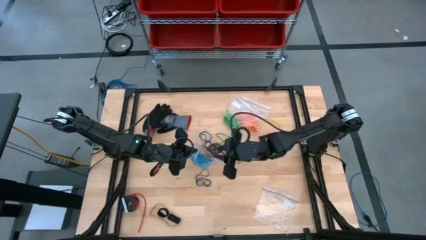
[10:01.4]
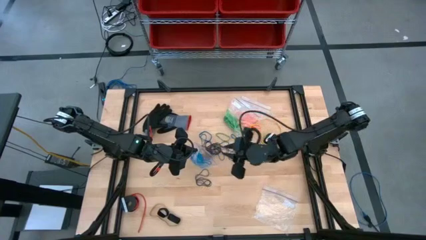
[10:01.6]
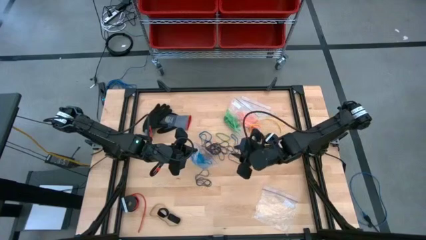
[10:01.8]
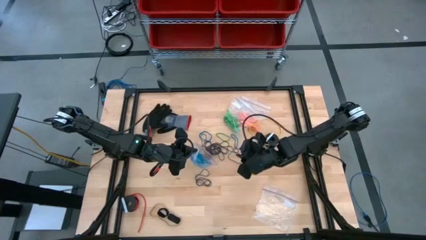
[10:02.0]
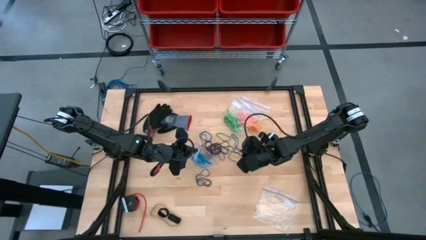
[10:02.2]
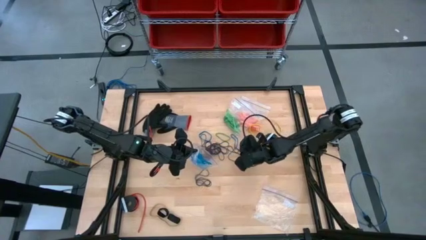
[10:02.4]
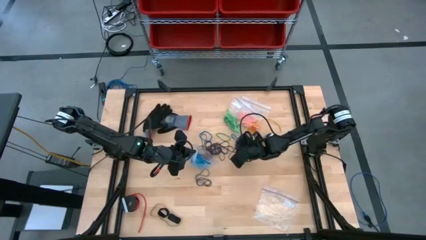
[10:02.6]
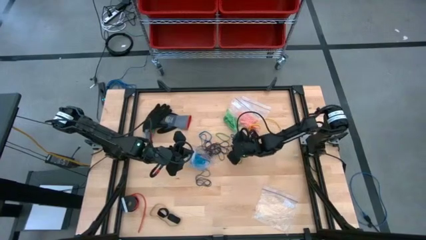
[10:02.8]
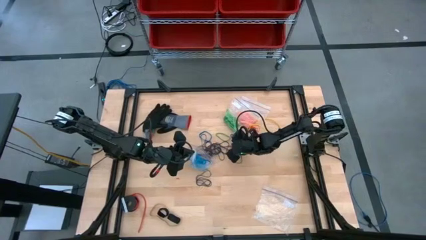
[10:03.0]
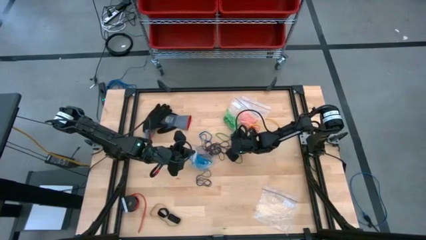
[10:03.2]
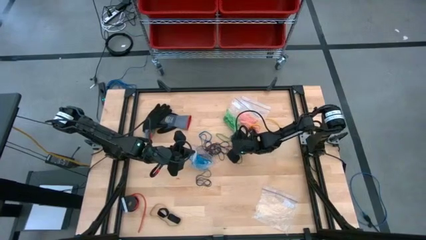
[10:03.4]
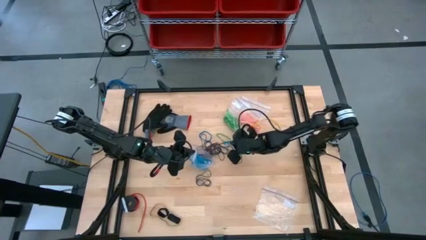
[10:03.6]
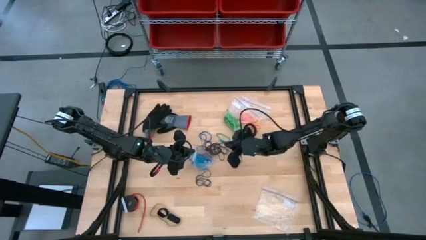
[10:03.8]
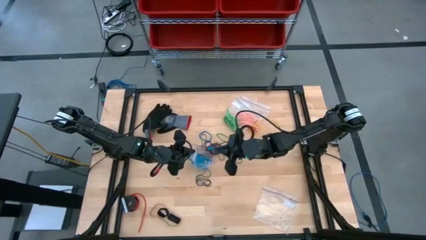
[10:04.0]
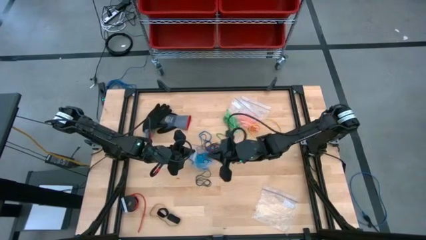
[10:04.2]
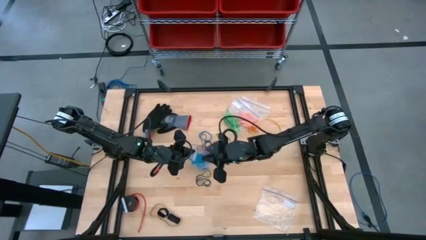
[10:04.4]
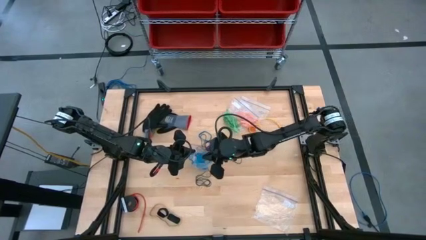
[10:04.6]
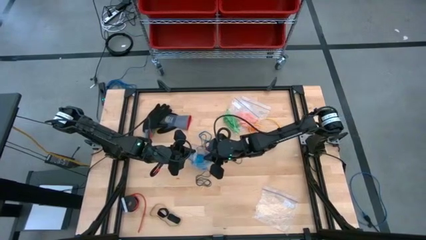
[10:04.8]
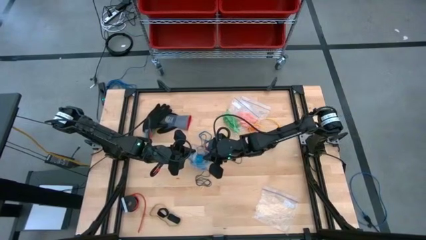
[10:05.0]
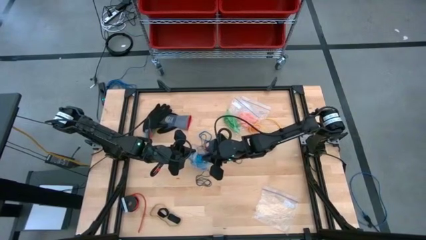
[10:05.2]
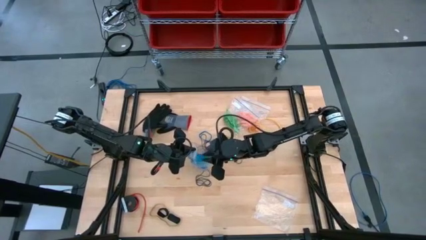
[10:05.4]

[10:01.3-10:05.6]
Task: Sort rubber bands
Put the blue rubber band into the transparent zip bag

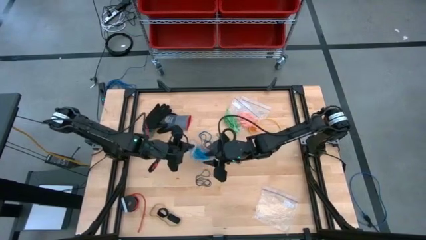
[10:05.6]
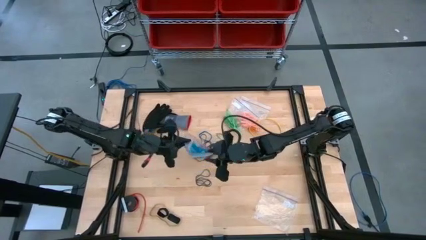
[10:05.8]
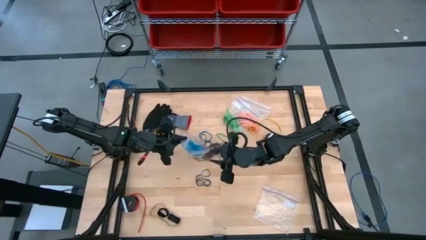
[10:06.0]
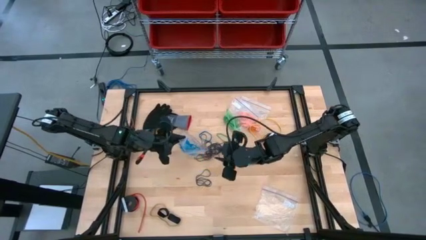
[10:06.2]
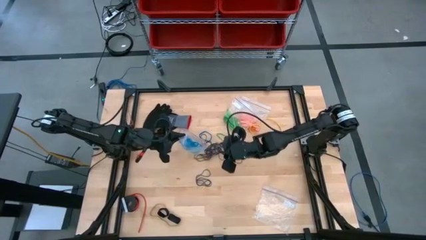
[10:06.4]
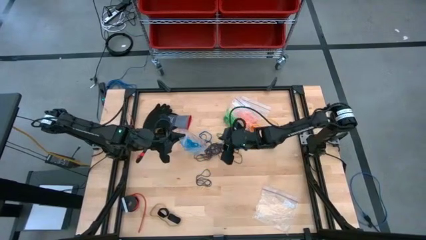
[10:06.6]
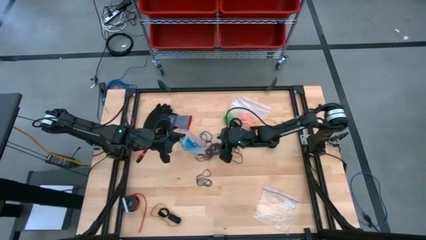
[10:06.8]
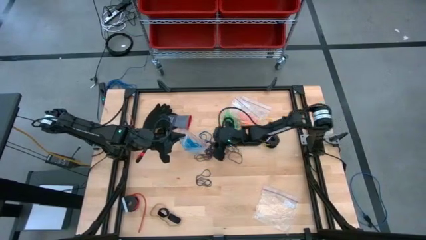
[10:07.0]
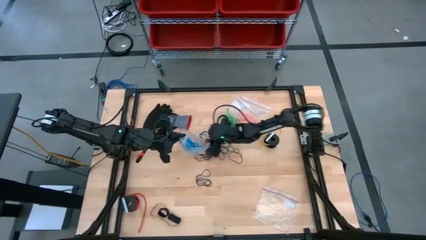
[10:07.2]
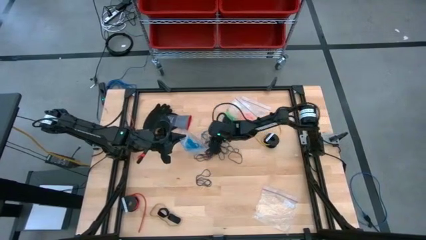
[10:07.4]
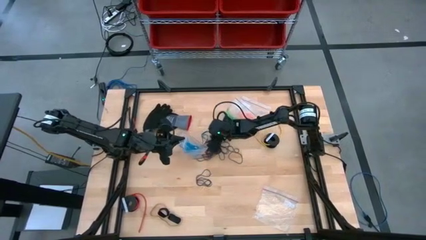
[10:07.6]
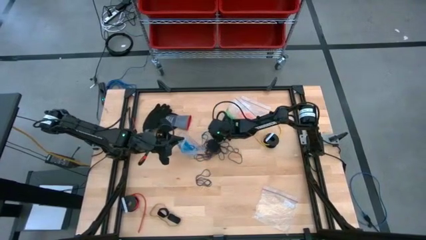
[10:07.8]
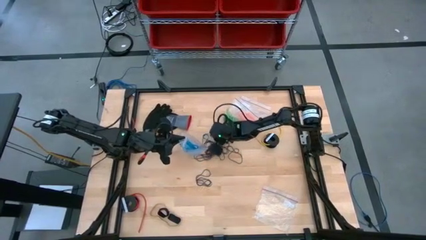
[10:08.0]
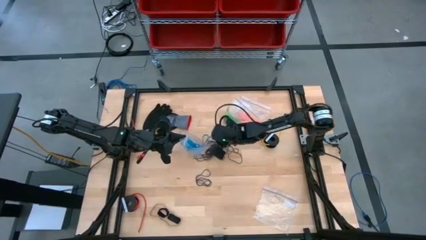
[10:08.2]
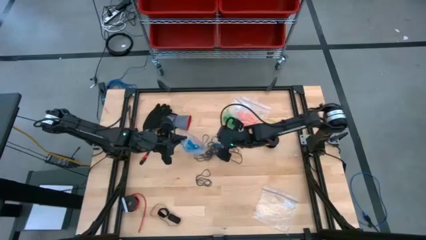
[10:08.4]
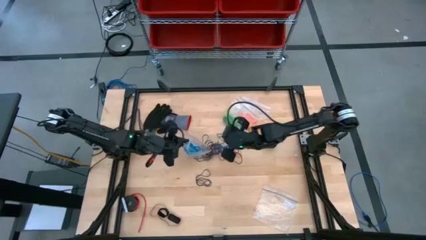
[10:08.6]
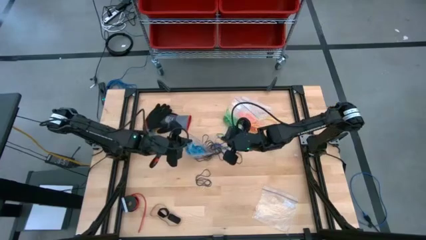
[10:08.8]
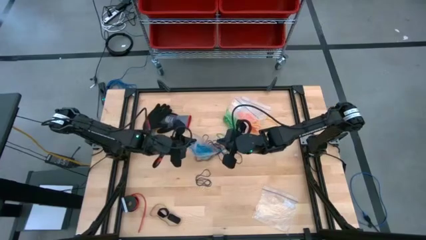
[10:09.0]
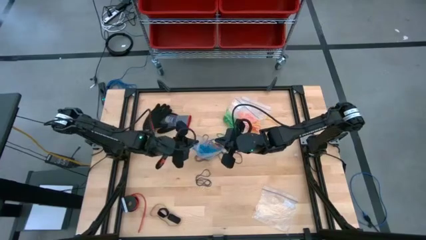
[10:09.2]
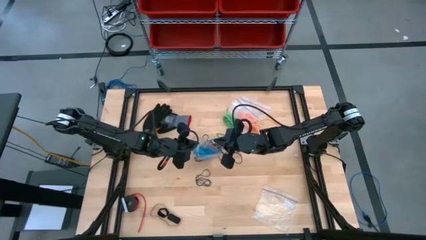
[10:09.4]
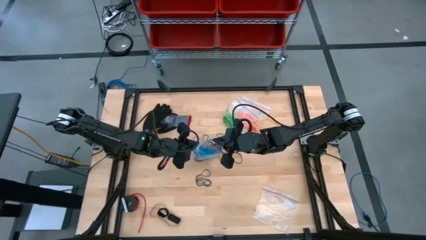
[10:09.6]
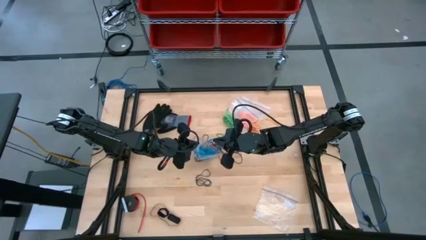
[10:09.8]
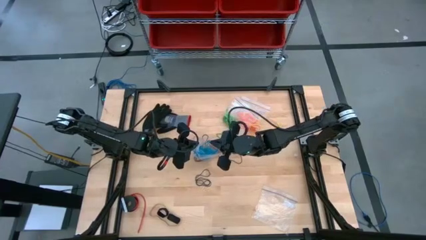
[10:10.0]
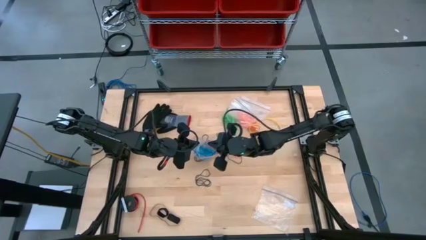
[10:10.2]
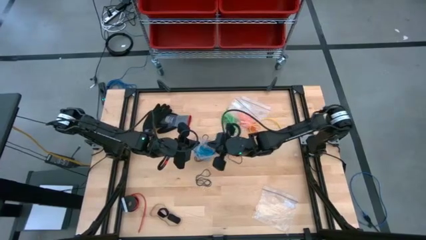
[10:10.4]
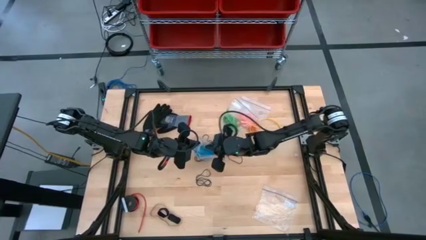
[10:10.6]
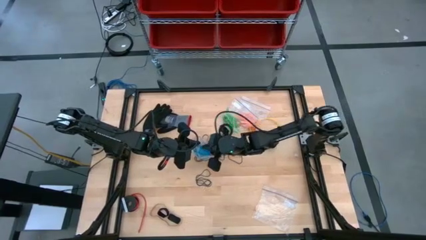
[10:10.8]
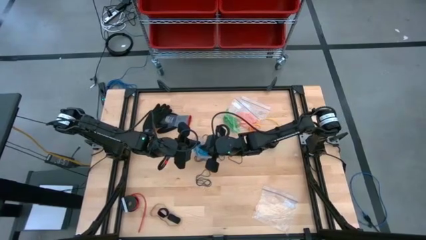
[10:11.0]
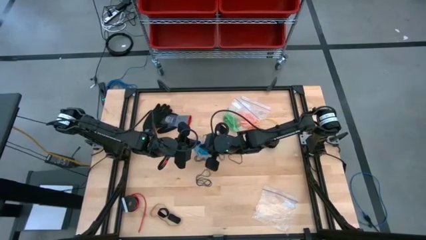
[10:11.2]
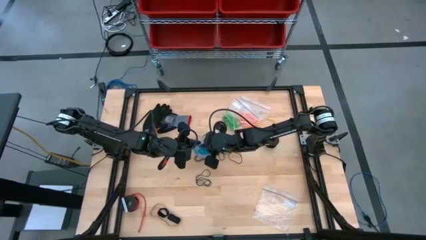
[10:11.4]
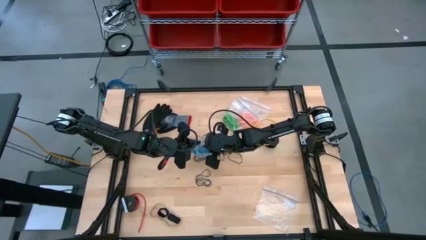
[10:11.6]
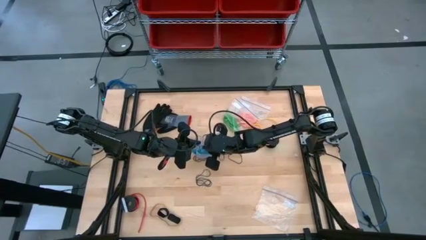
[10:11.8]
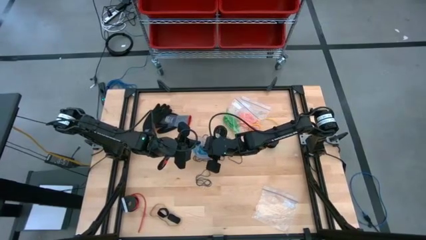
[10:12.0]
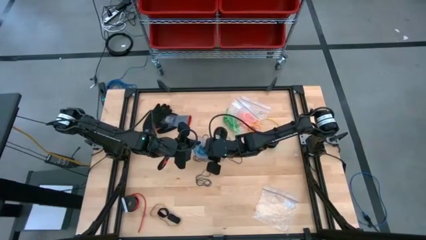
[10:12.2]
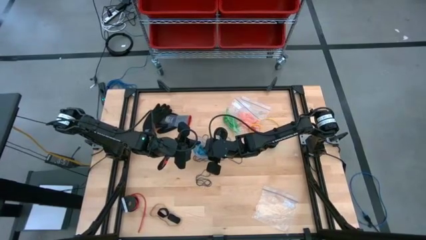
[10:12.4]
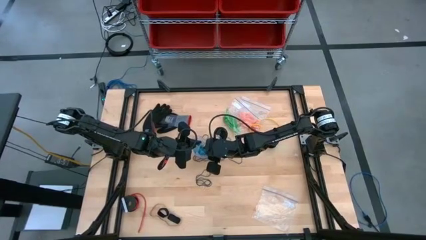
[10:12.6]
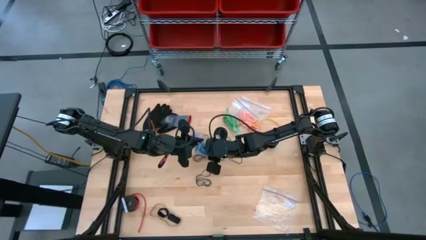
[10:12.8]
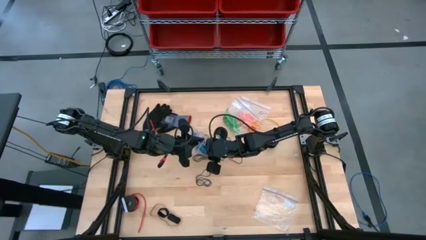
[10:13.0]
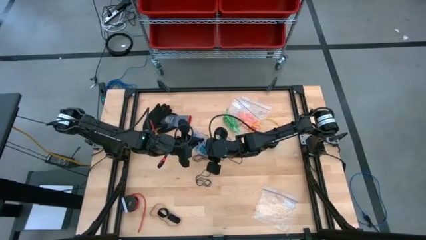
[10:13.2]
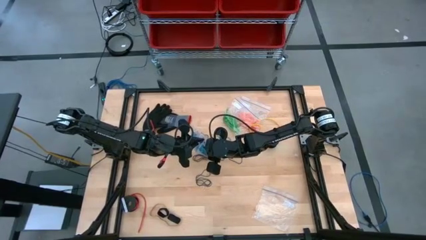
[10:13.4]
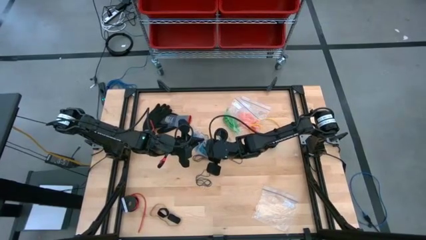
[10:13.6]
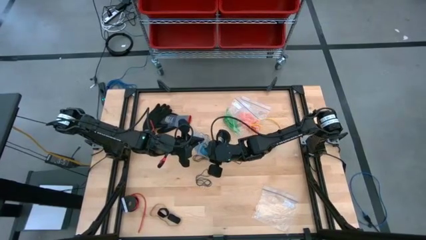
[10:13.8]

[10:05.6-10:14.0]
Put the blue rubber band into the transparent zip bag
